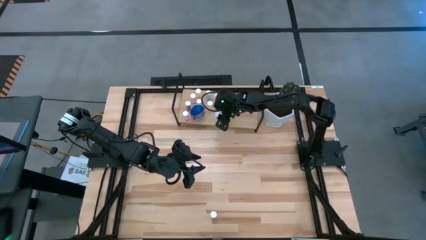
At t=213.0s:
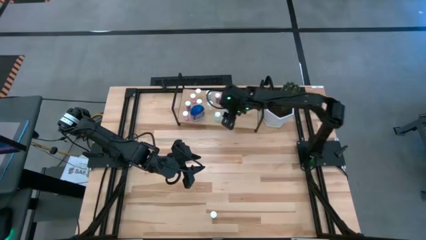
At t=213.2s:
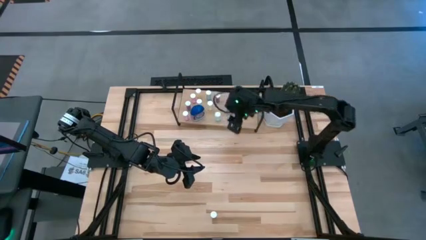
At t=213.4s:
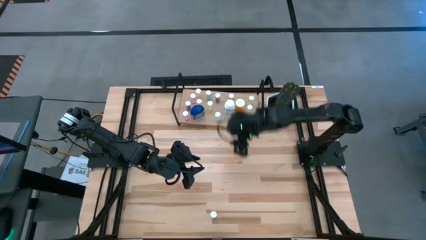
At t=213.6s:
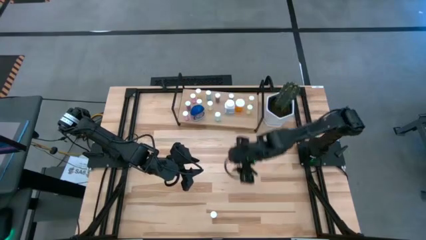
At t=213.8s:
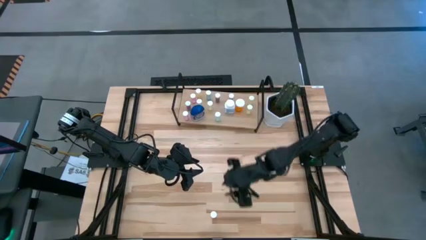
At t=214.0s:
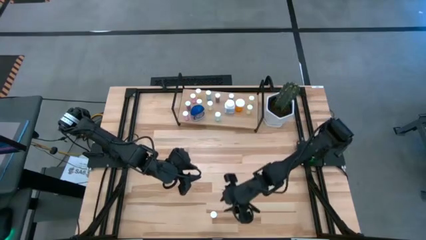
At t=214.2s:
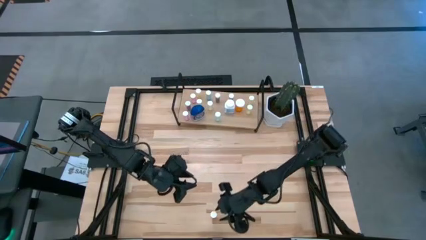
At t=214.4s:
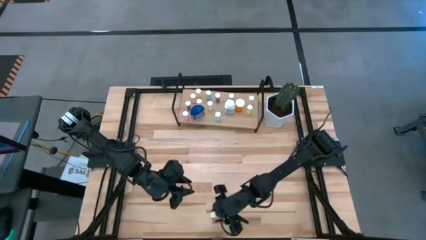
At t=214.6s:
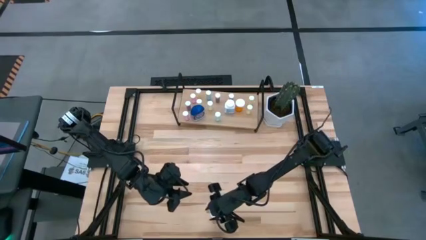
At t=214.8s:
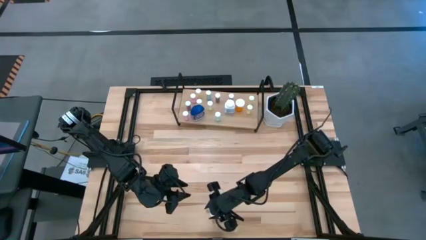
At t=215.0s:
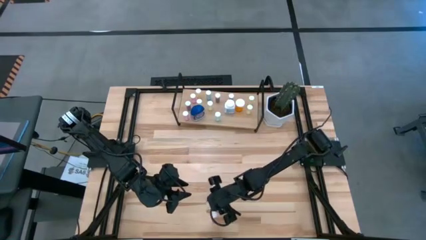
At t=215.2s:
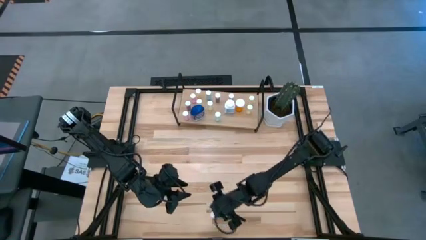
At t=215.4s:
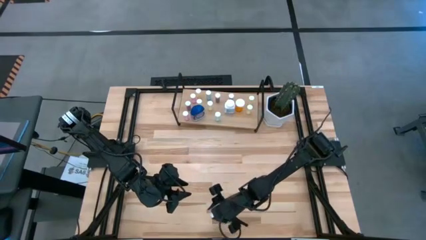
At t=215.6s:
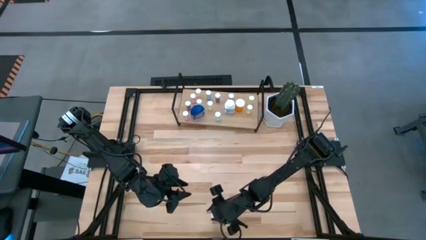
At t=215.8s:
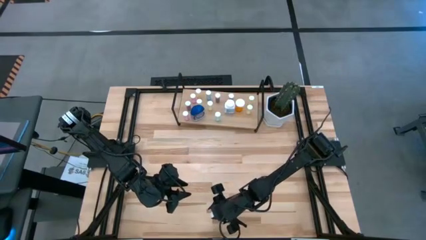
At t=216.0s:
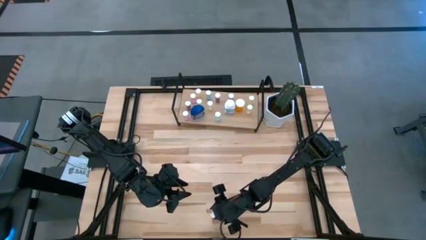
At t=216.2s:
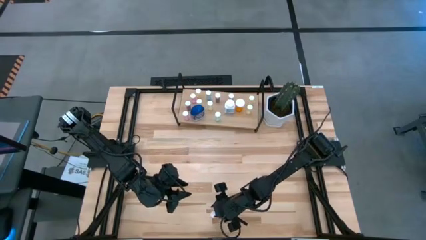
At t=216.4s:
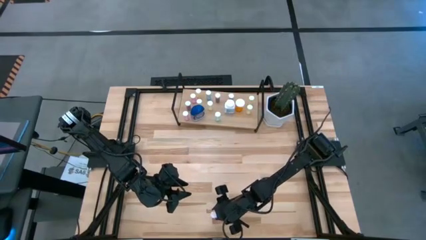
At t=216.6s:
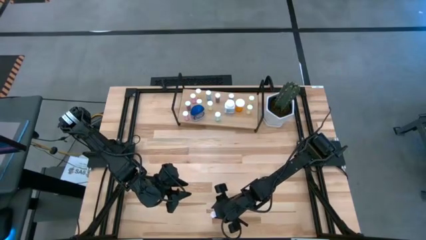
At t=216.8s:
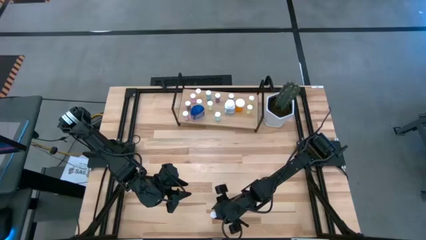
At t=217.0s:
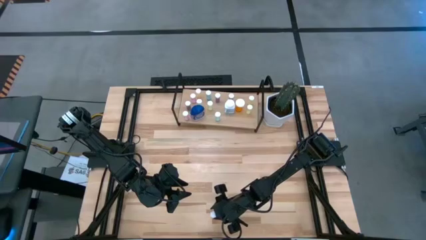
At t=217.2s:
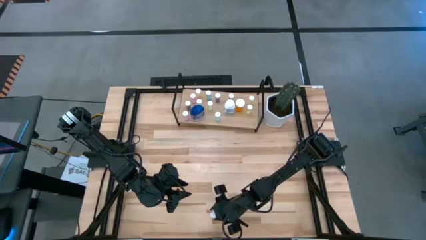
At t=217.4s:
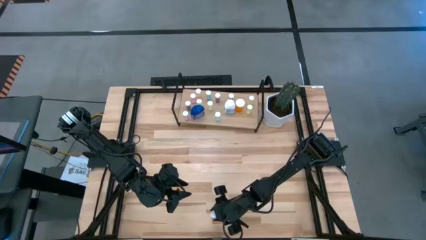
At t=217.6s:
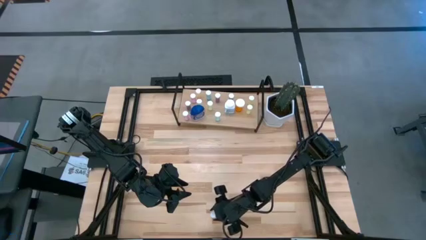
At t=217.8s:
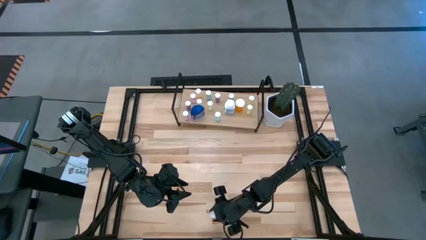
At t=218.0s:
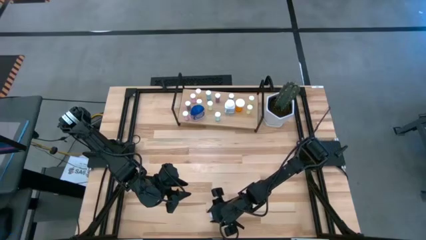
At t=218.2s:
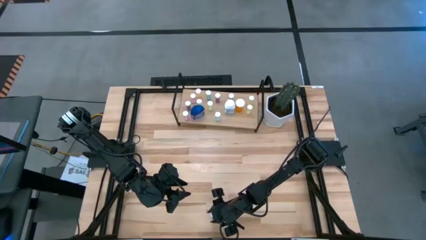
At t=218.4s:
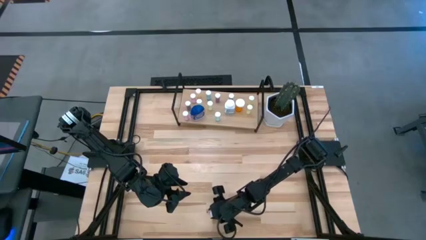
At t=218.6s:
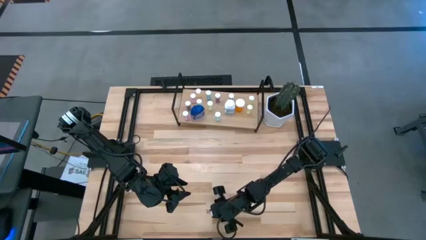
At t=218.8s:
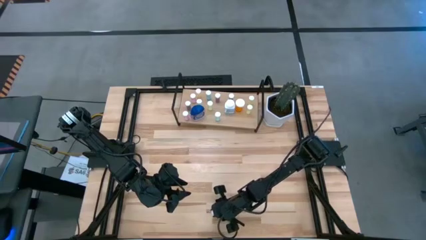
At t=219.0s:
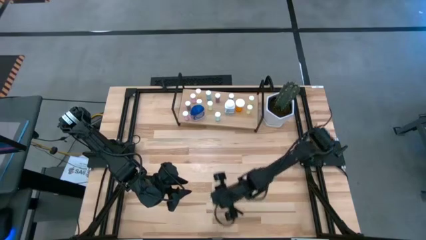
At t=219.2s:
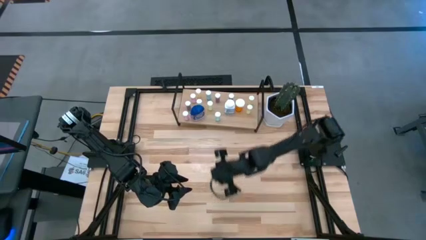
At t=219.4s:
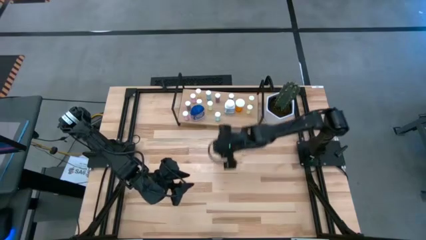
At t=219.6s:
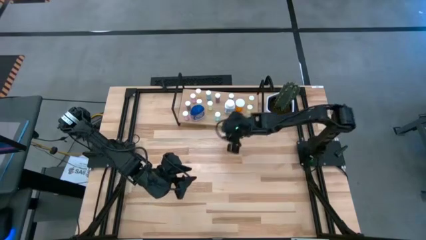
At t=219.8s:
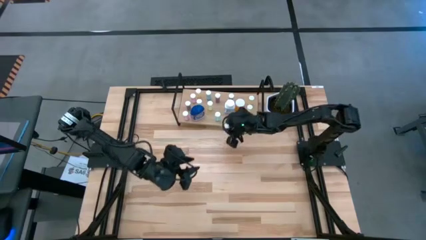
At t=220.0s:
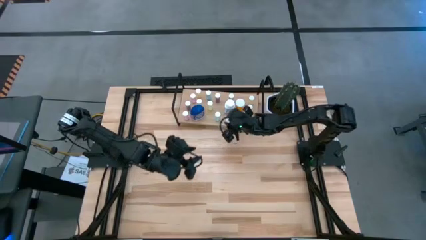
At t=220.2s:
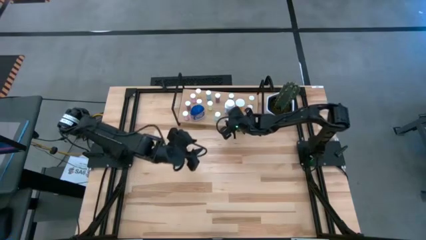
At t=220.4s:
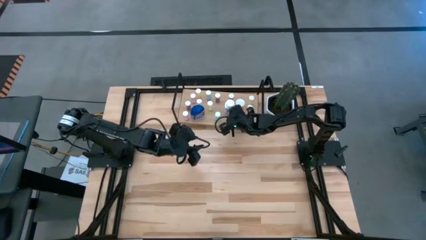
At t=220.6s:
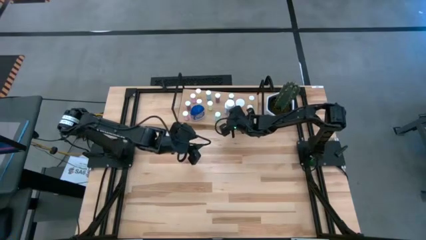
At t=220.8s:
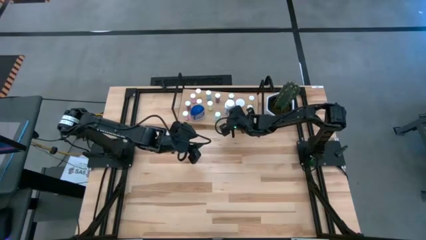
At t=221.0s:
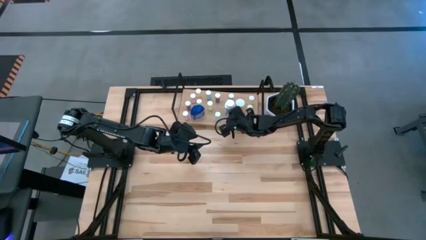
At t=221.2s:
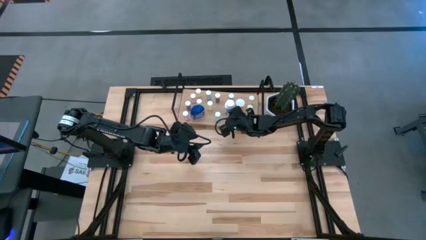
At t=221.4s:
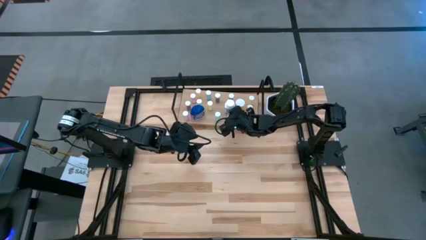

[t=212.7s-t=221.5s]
Task: Pick and place medicine bottles onto shelf by color
Put the pink pill bottle on the shelf
